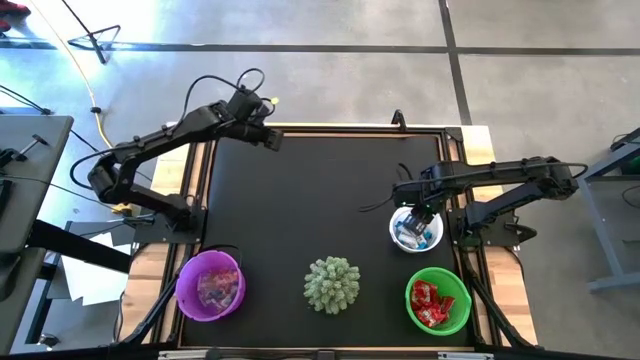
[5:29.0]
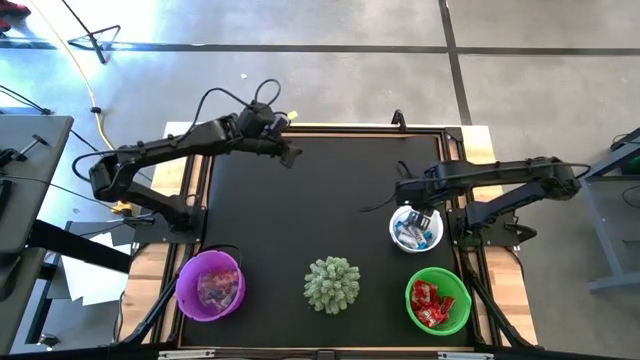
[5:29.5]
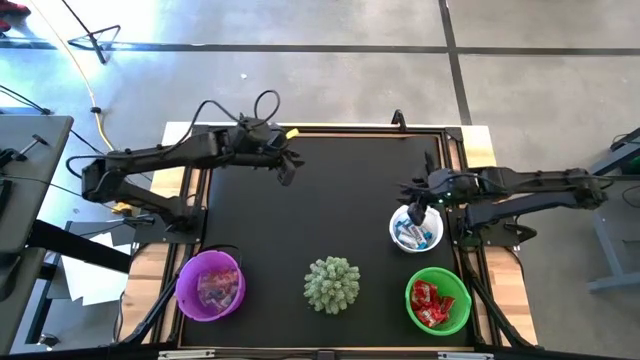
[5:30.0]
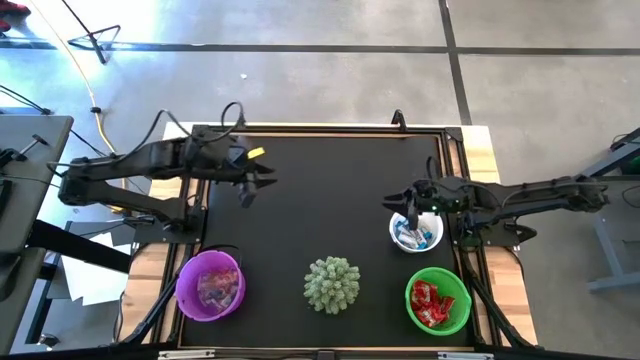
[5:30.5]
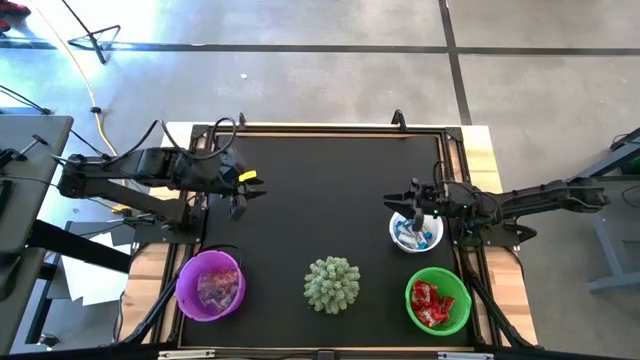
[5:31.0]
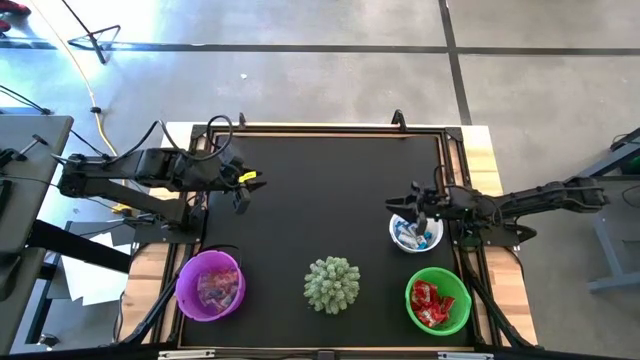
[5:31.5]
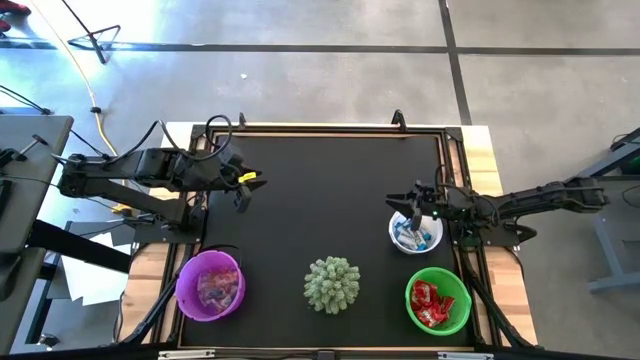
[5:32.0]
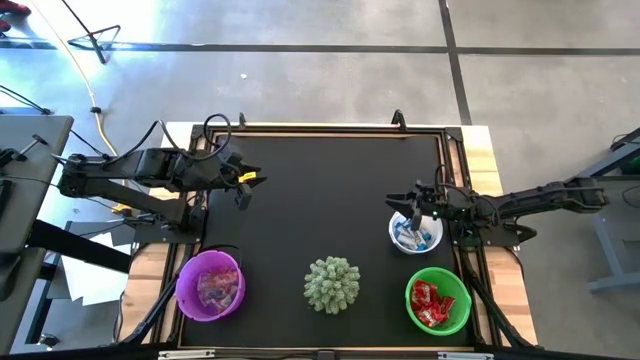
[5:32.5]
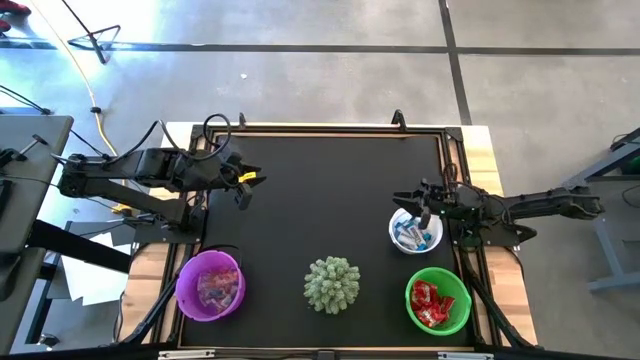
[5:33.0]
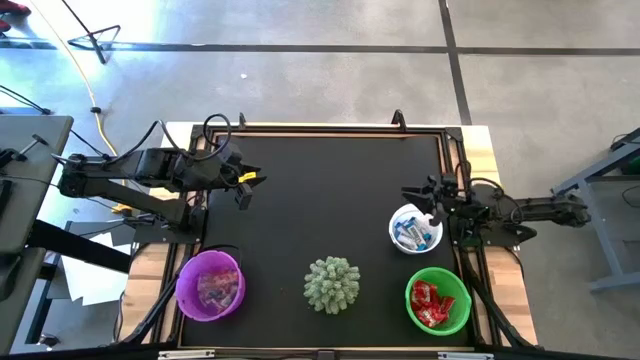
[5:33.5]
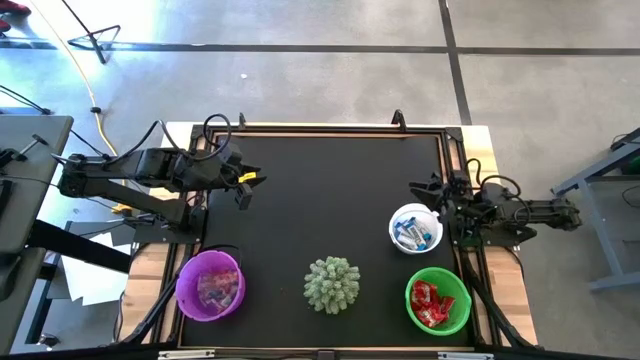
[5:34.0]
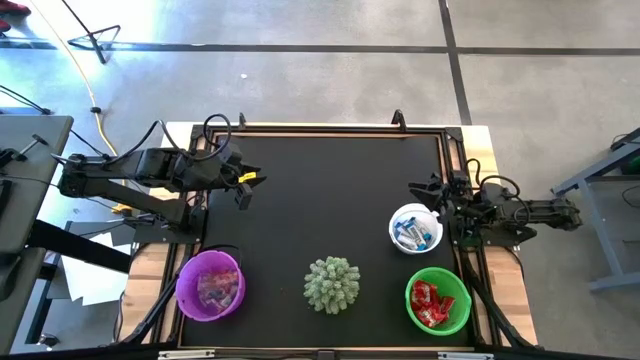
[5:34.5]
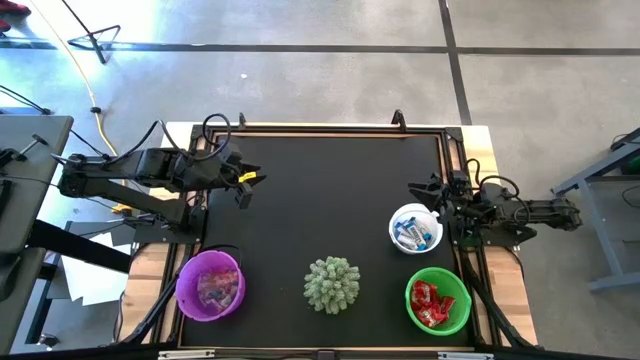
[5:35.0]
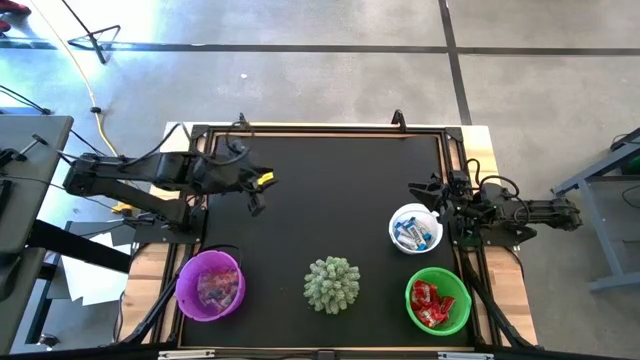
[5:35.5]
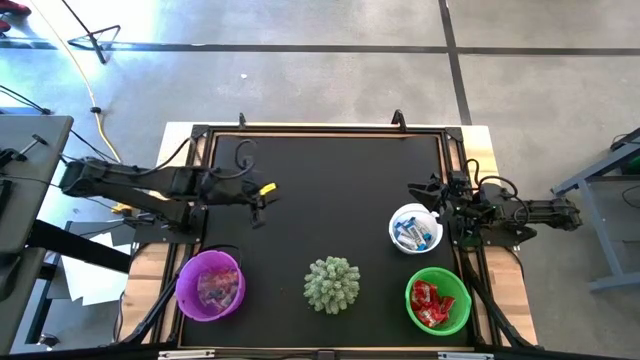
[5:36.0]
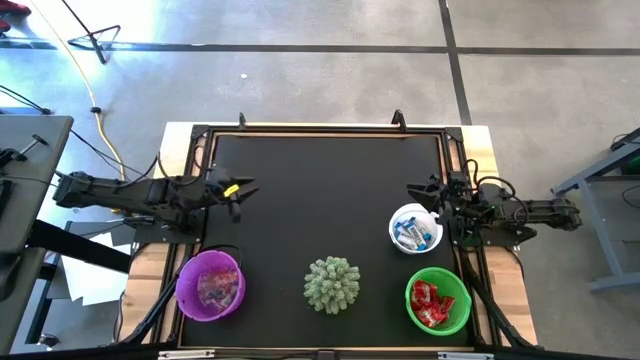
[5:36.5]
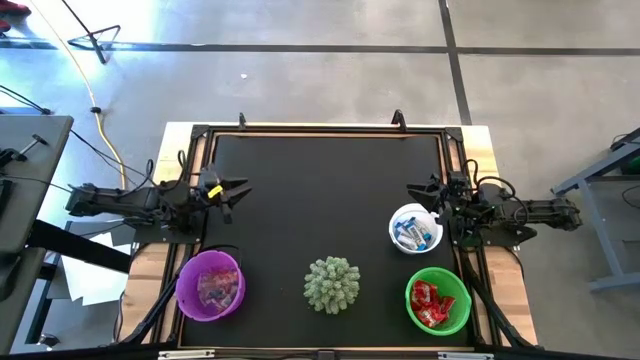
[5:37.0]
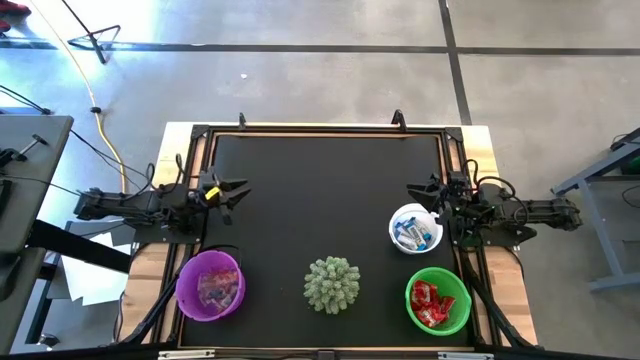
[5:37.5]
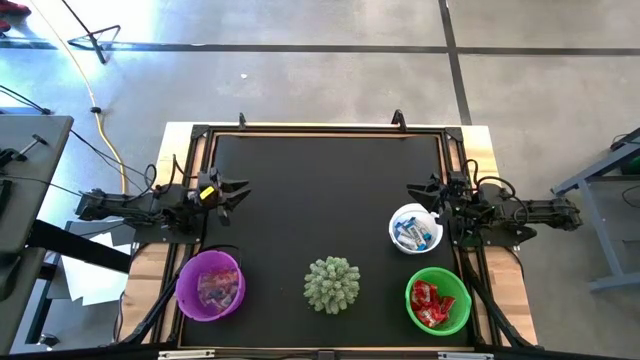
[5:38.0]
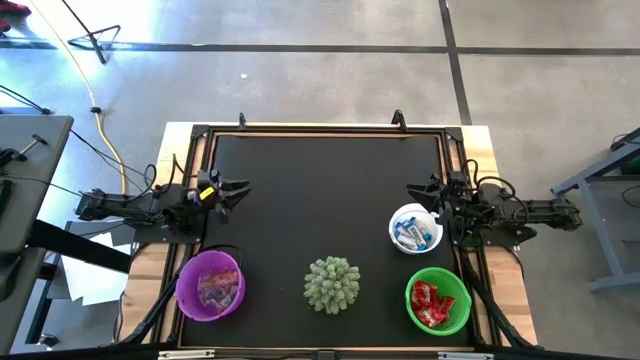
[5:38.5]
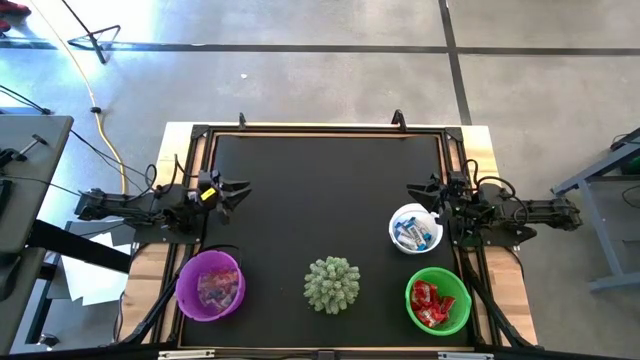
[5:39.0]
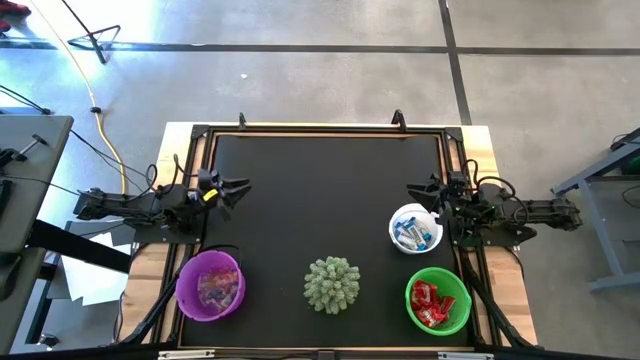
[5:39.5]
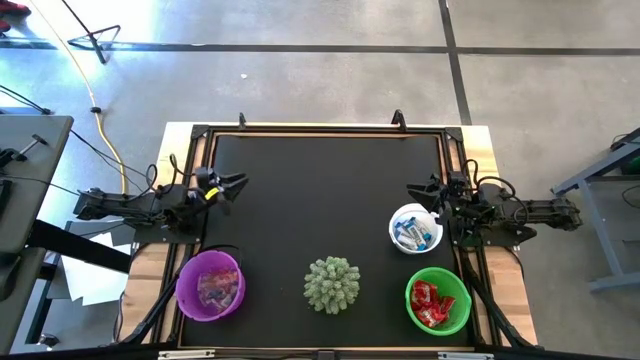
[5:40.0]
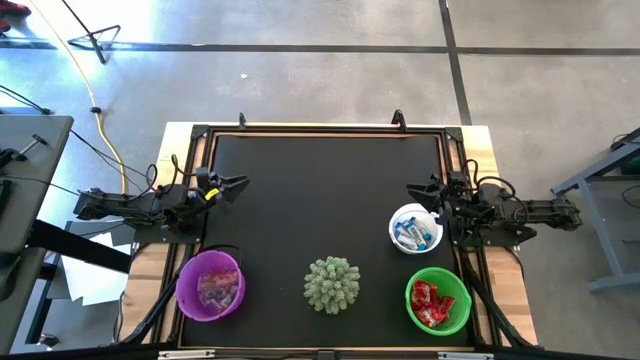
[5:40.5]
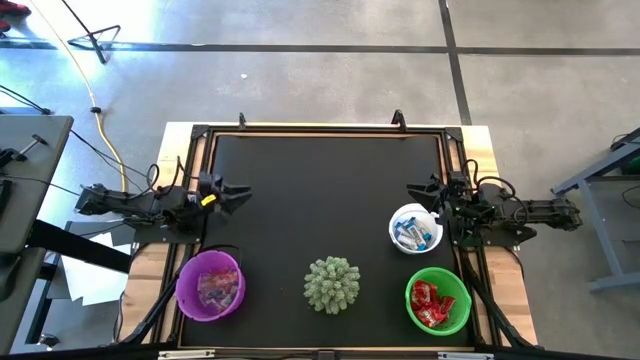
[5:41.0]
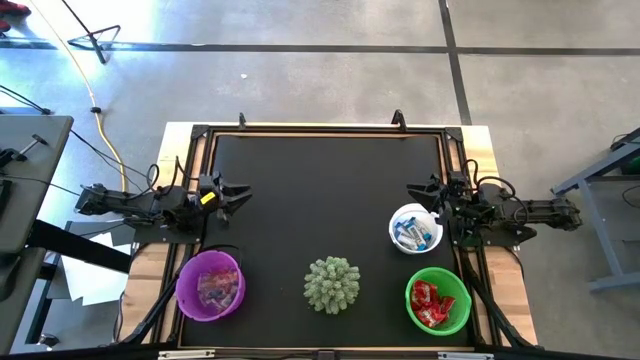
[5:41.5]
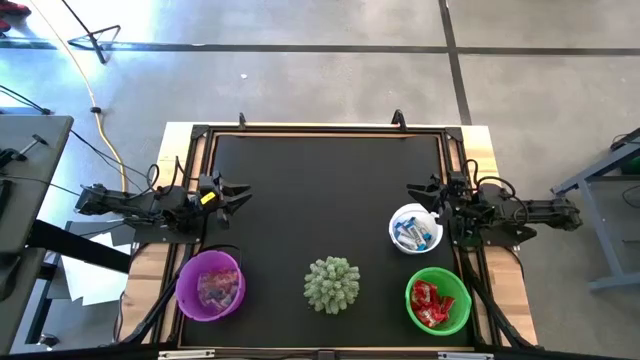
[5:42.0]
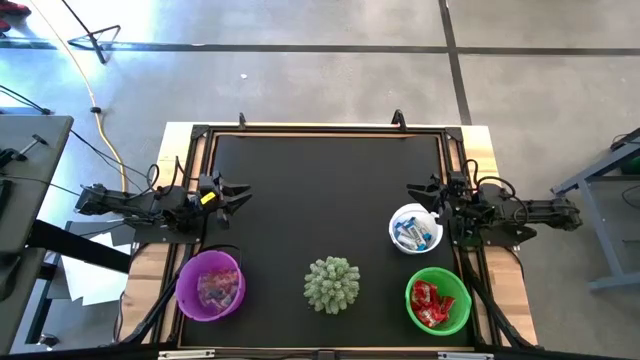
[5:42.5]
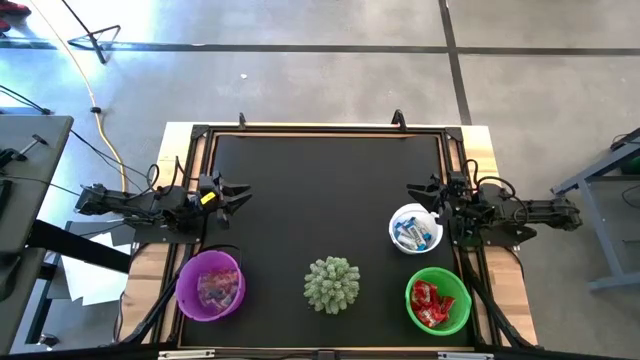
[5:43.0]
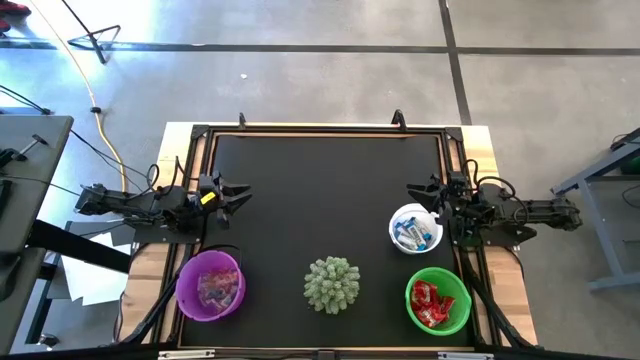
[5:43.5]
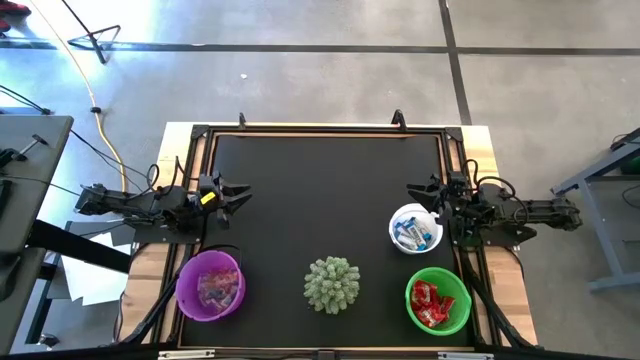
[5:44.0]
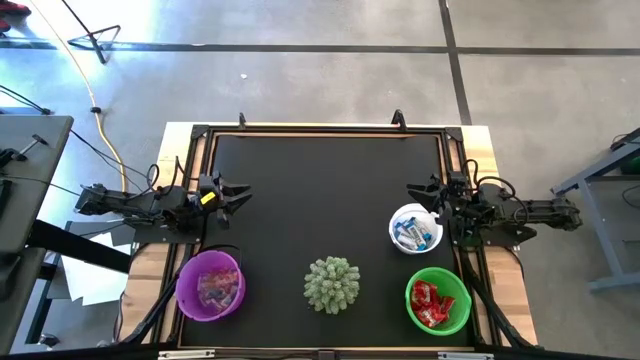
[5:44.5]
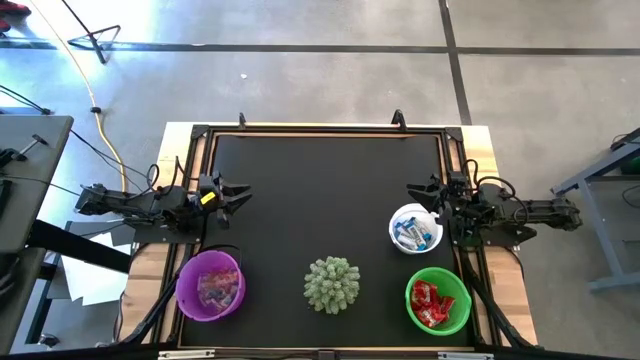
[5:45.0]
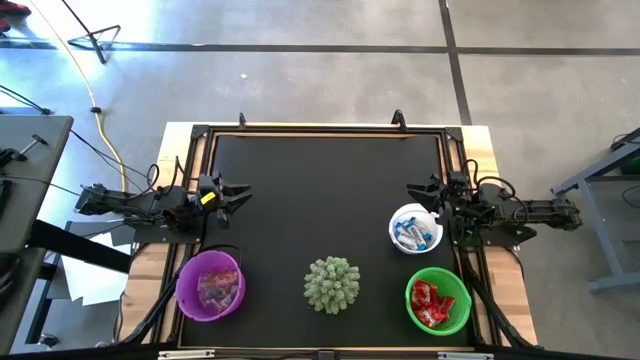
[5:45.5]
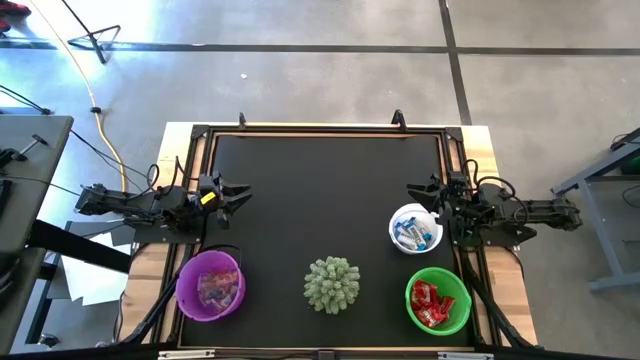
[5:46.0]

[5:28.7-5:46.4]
Task: Sort candy
Return to home position

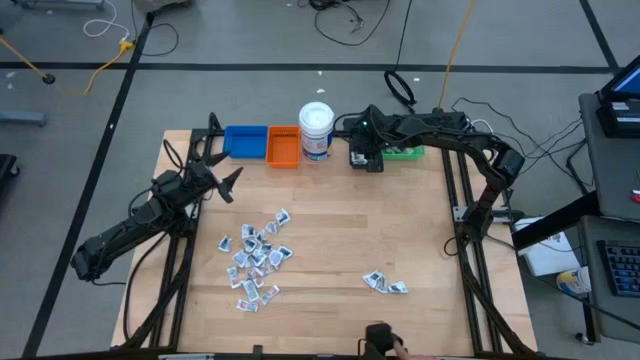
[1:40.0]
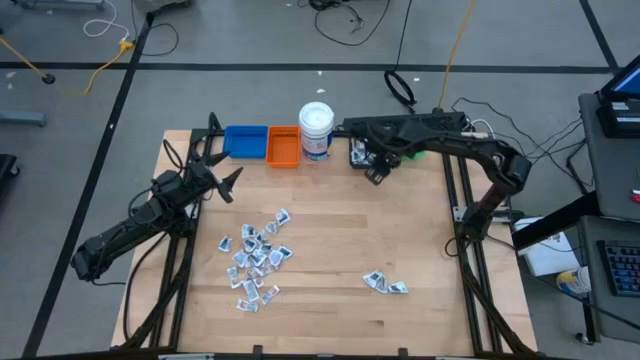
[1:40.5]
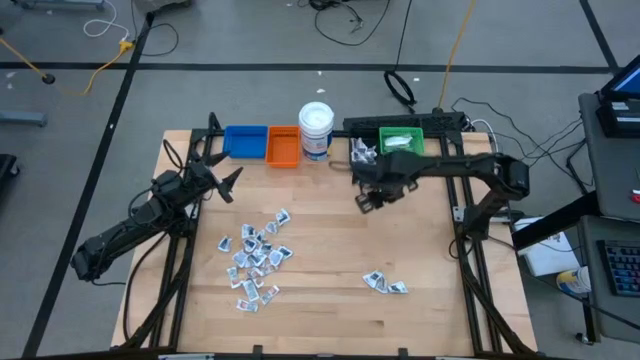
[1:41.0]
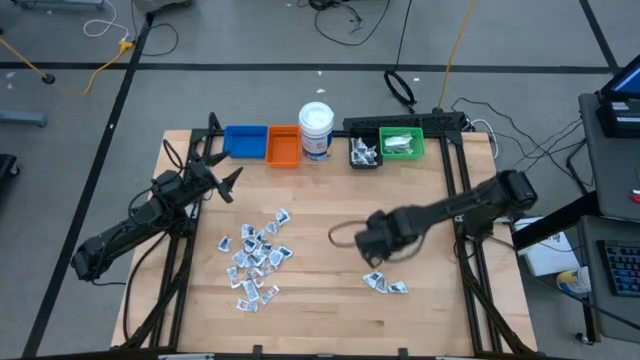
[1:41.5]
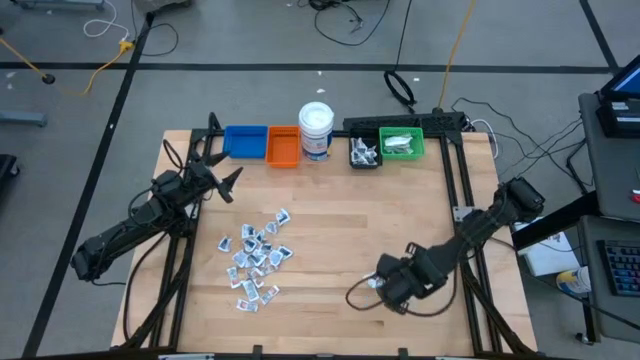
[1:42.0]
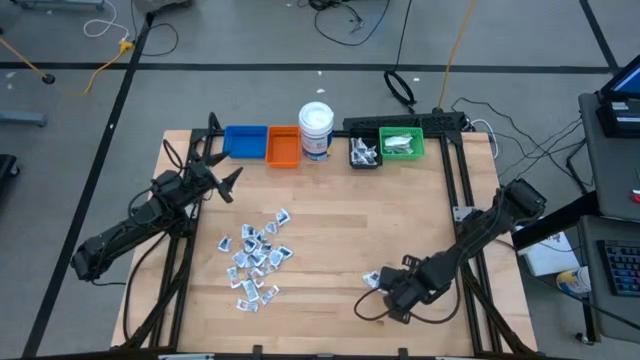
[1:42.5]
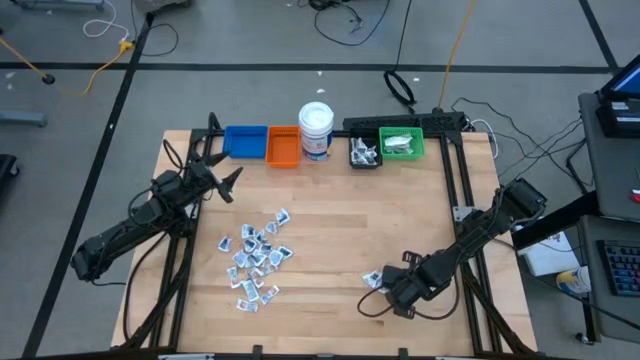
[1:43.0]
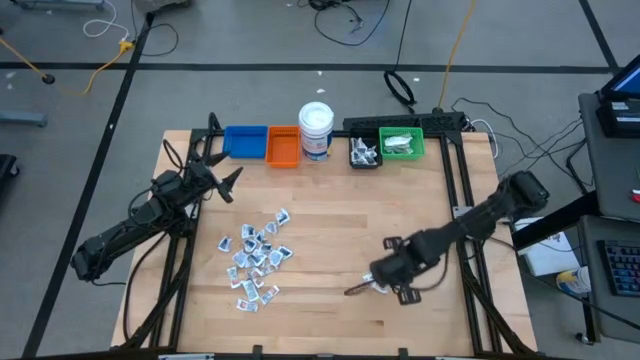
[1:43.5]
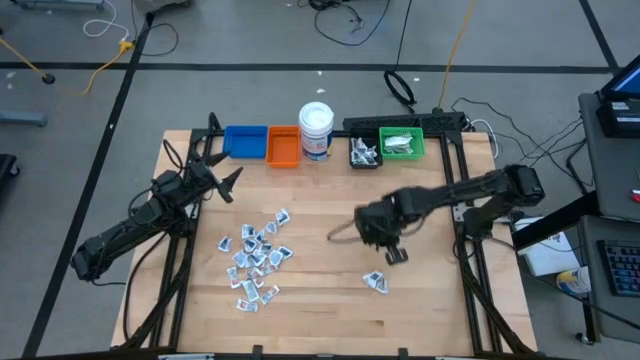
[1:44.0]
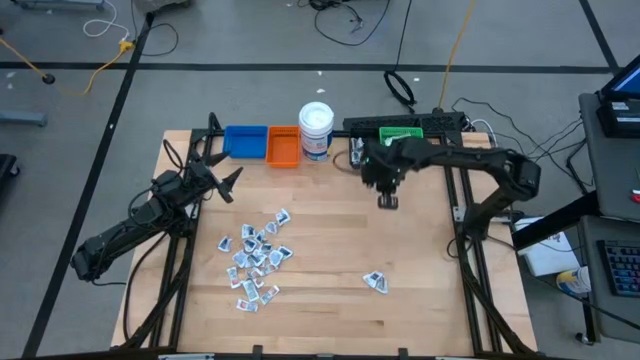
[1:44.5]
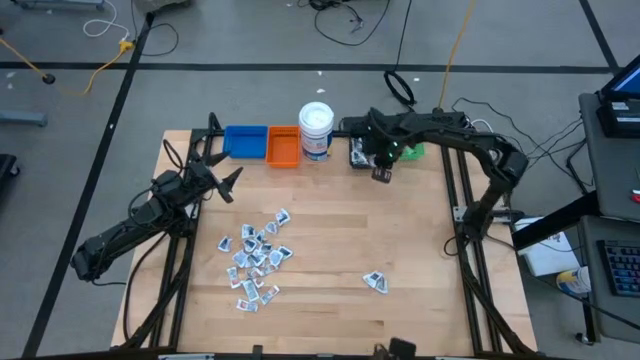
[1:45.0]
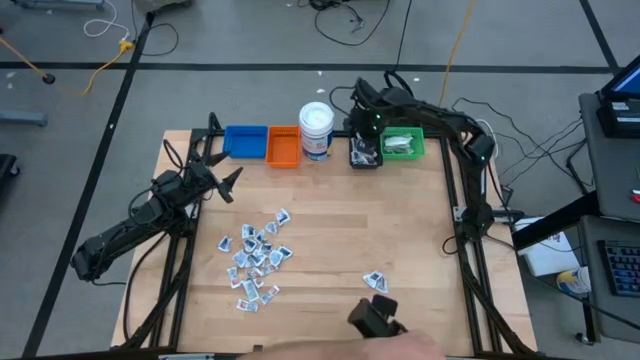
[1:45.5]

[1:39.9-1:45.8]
Task: Pick & Place First Aid Supplies
Put the towelette pack into the black bin
